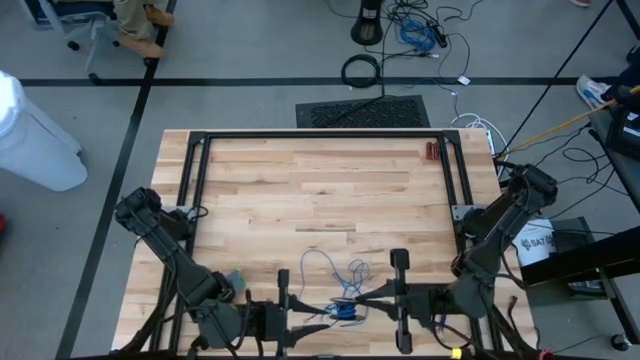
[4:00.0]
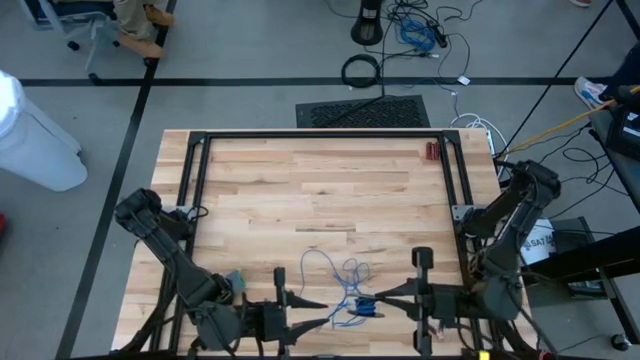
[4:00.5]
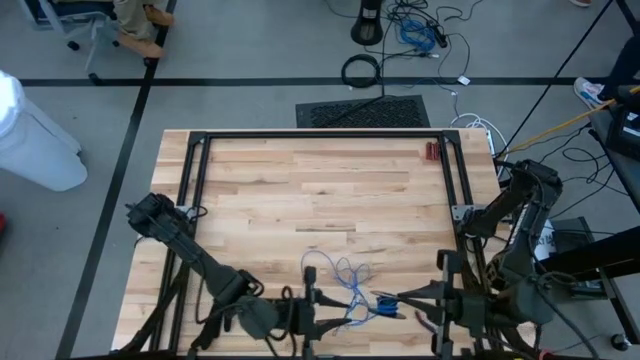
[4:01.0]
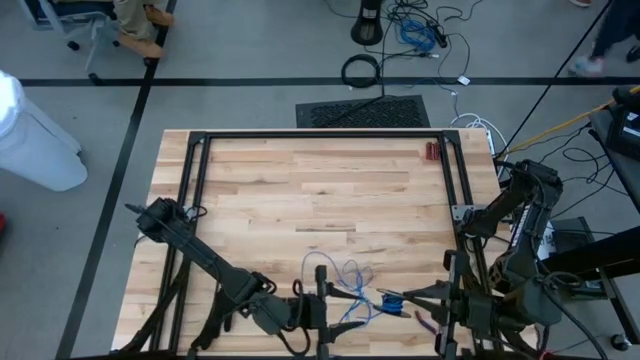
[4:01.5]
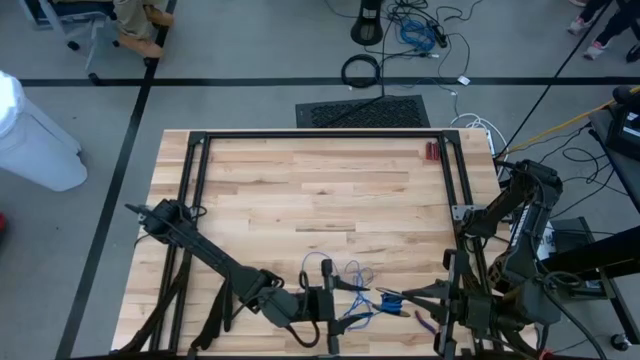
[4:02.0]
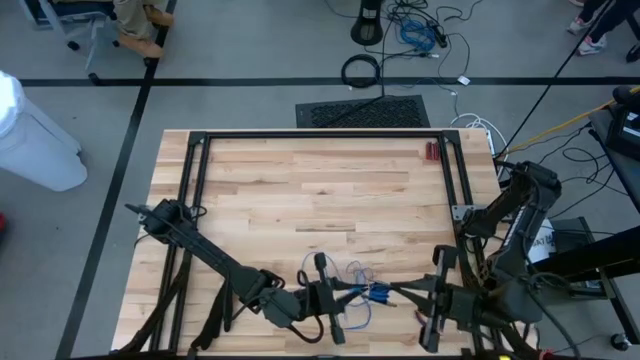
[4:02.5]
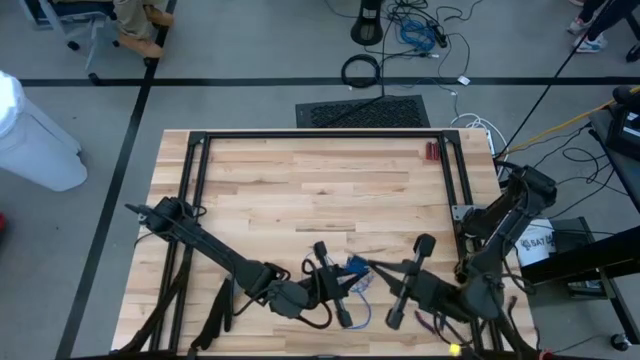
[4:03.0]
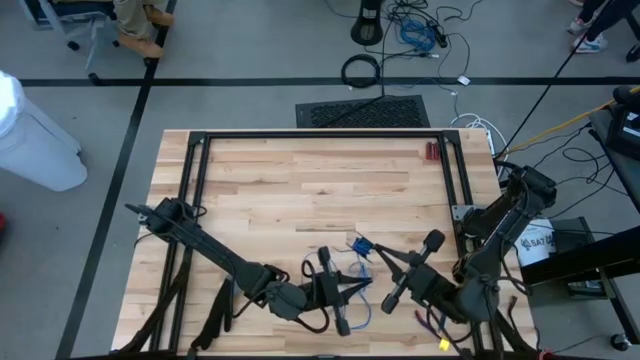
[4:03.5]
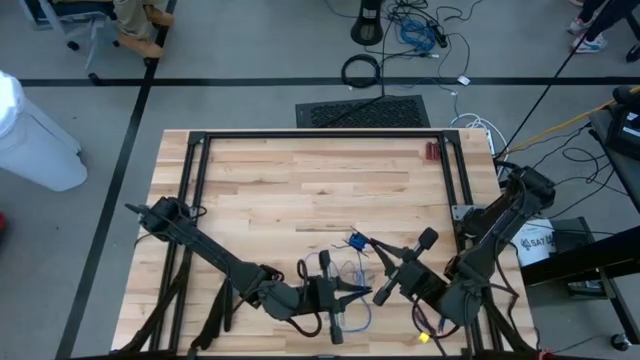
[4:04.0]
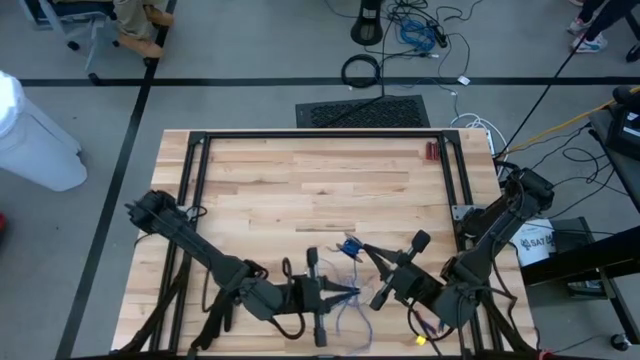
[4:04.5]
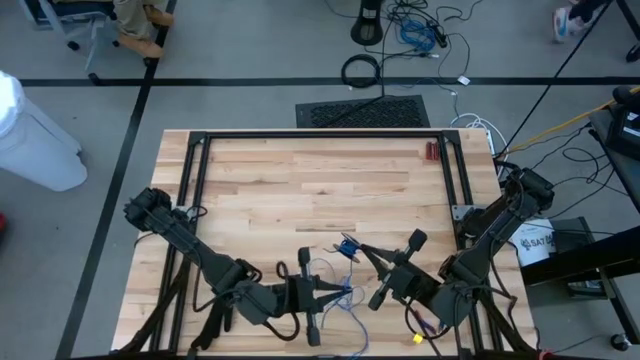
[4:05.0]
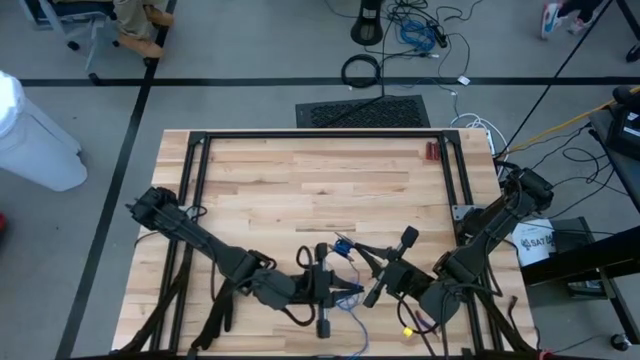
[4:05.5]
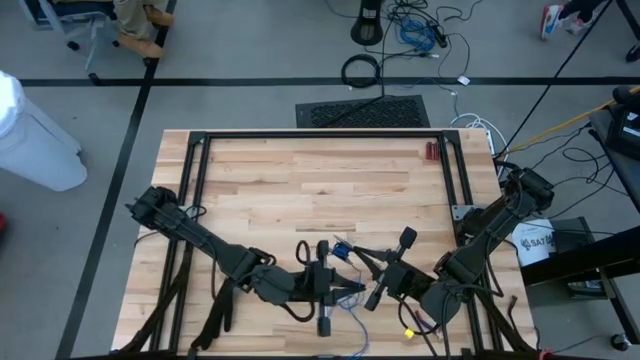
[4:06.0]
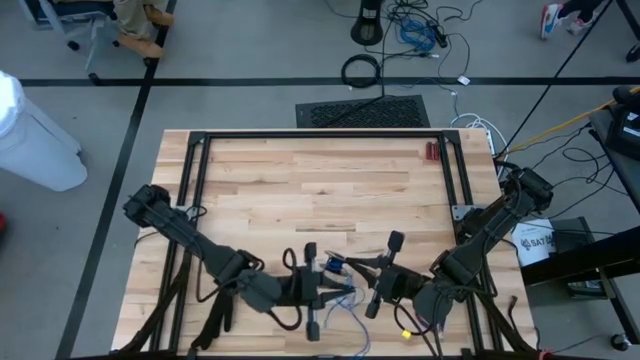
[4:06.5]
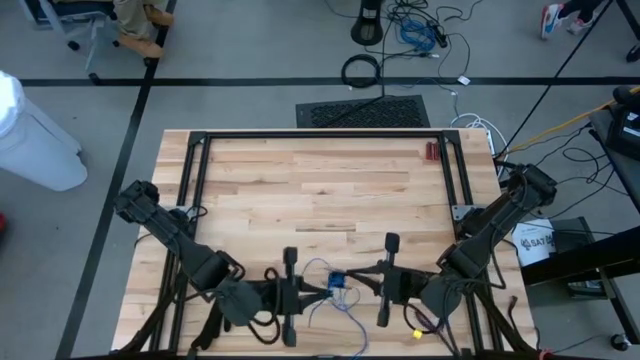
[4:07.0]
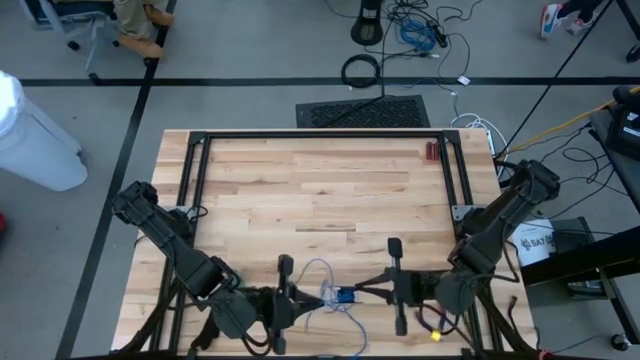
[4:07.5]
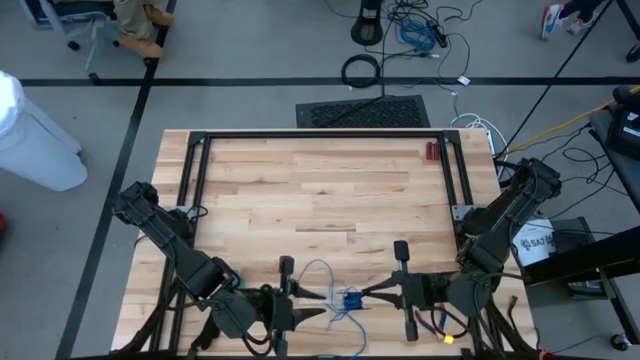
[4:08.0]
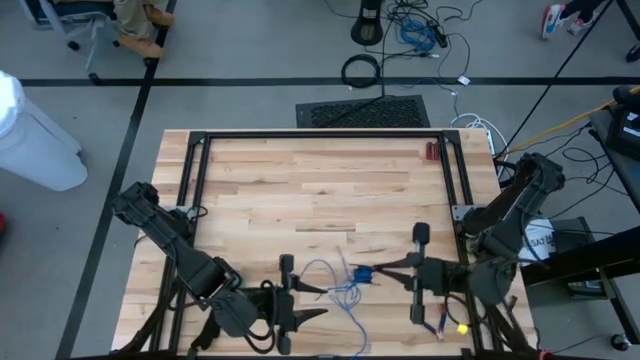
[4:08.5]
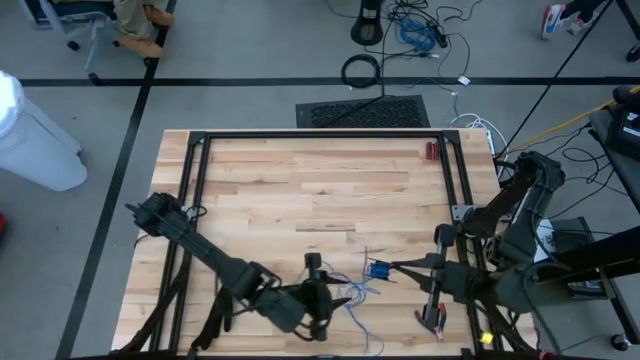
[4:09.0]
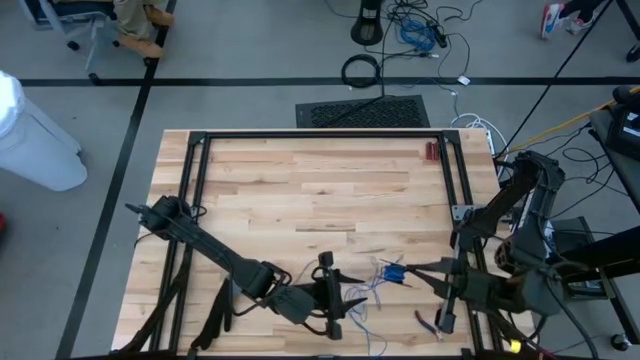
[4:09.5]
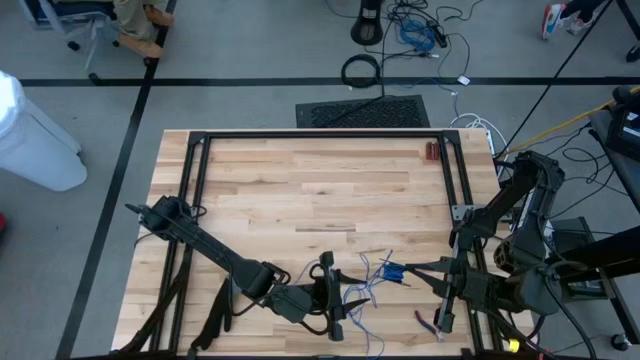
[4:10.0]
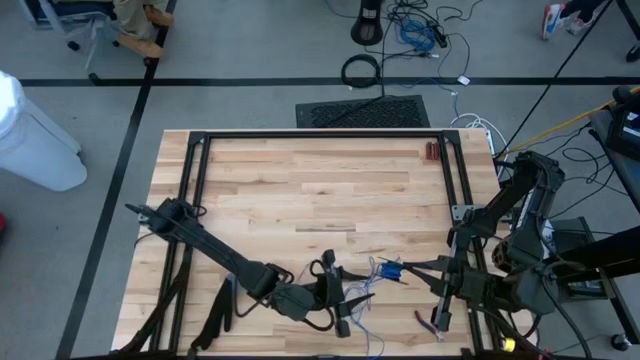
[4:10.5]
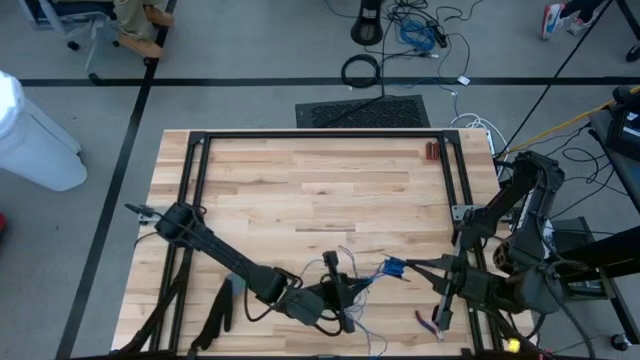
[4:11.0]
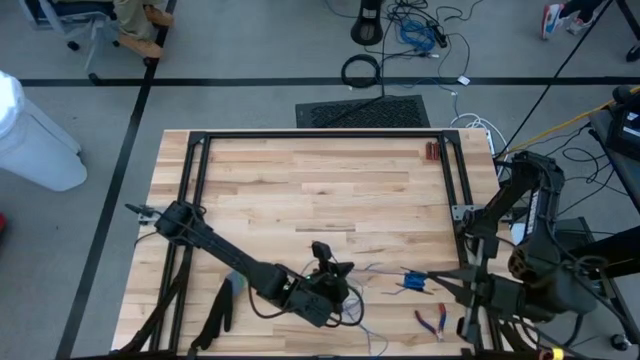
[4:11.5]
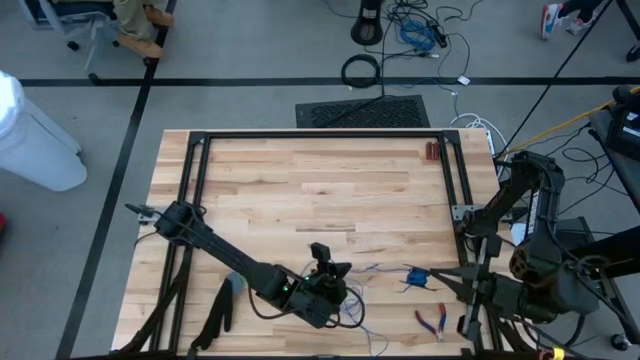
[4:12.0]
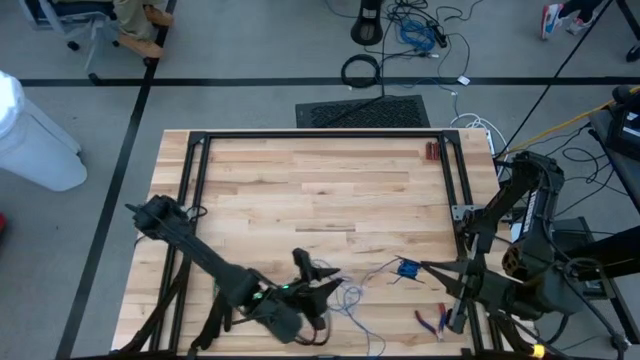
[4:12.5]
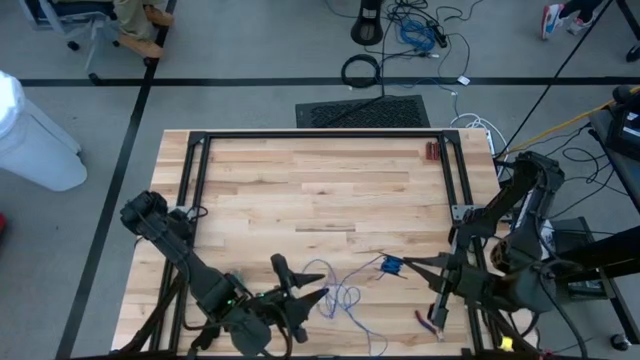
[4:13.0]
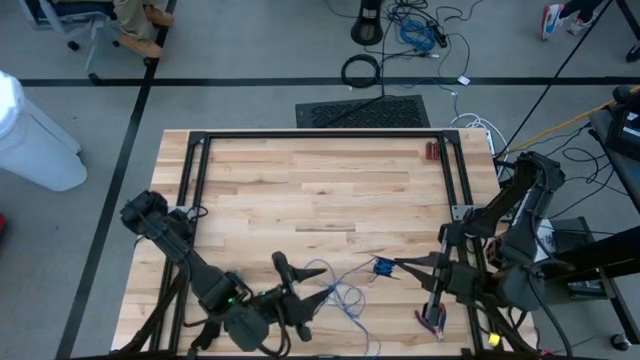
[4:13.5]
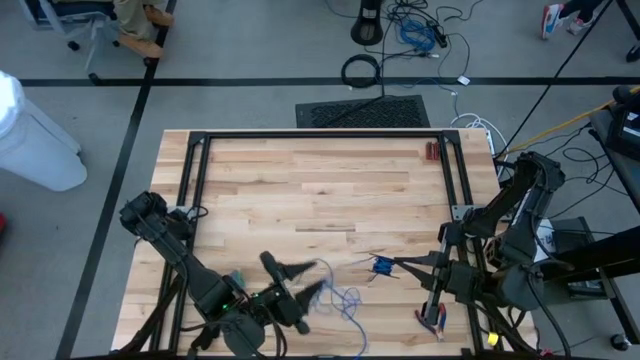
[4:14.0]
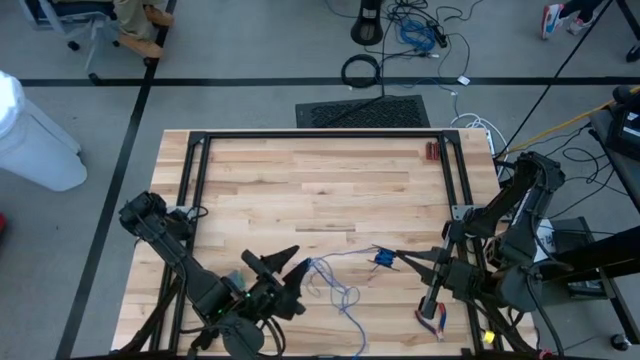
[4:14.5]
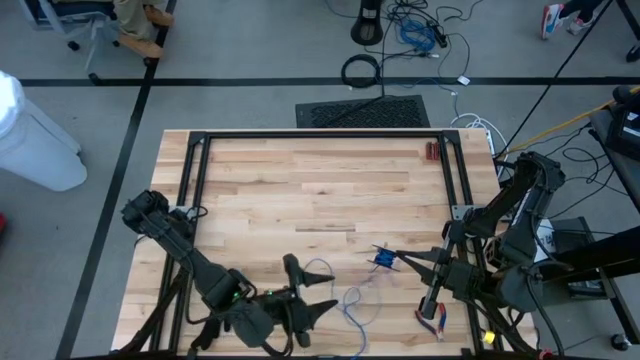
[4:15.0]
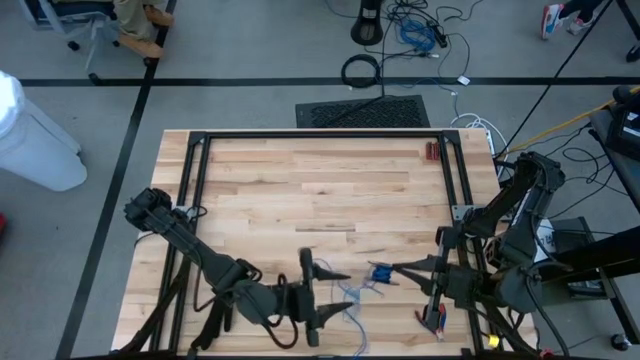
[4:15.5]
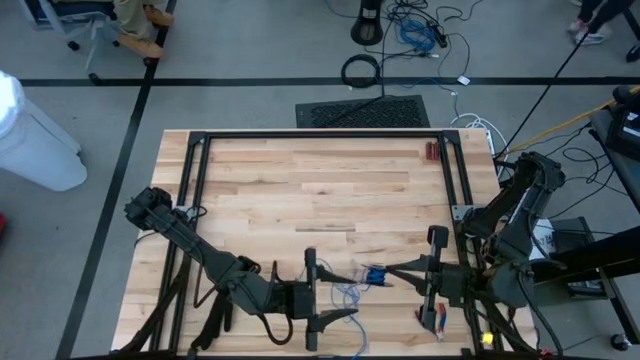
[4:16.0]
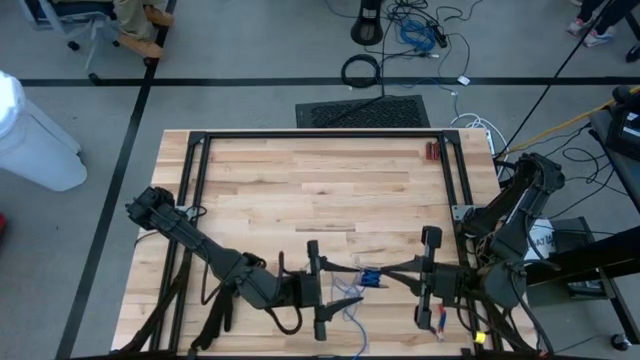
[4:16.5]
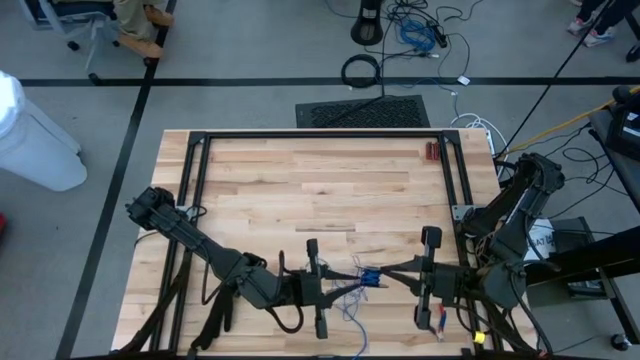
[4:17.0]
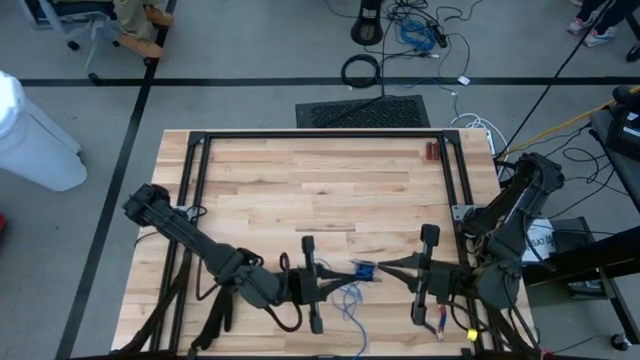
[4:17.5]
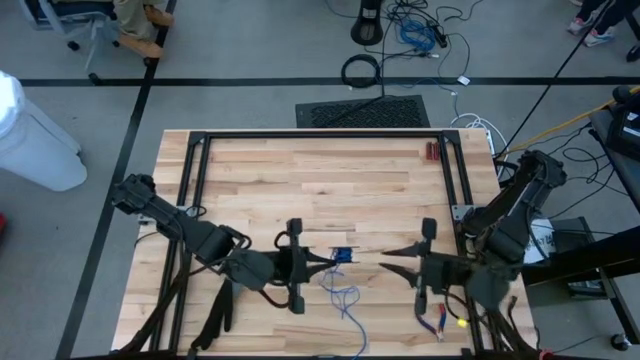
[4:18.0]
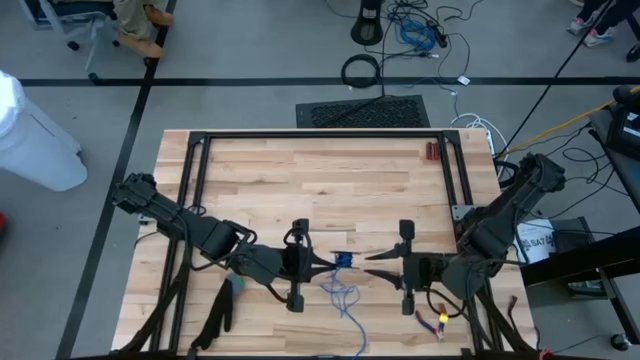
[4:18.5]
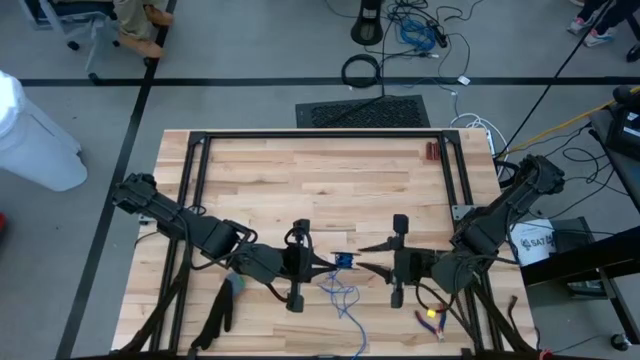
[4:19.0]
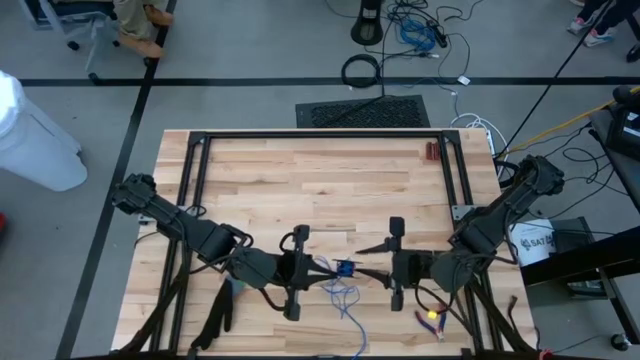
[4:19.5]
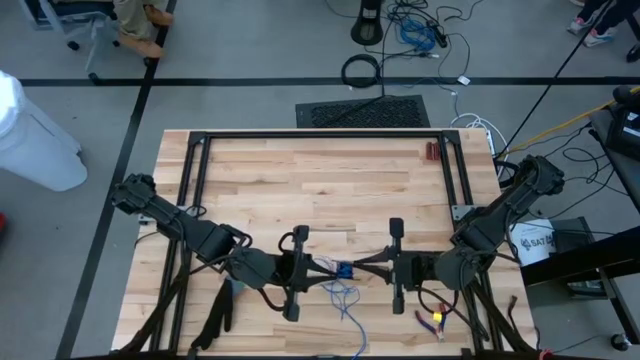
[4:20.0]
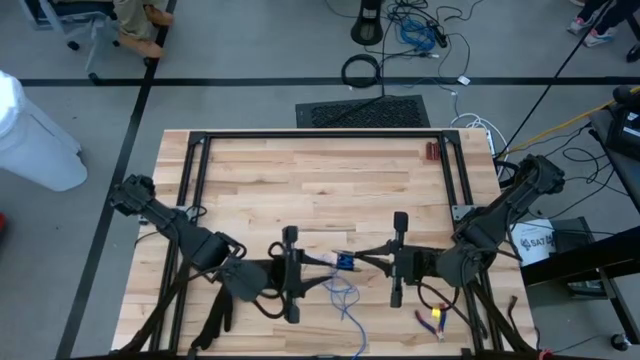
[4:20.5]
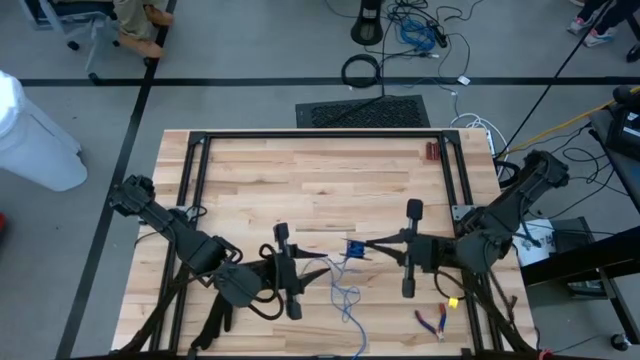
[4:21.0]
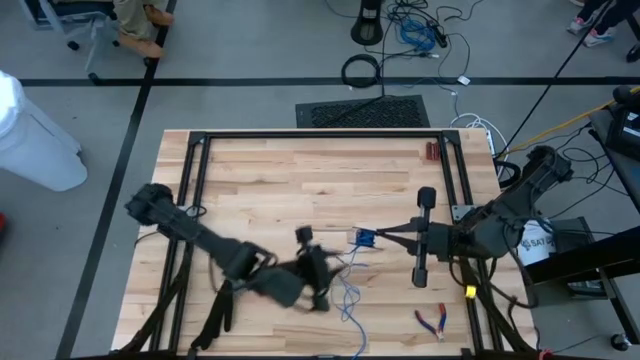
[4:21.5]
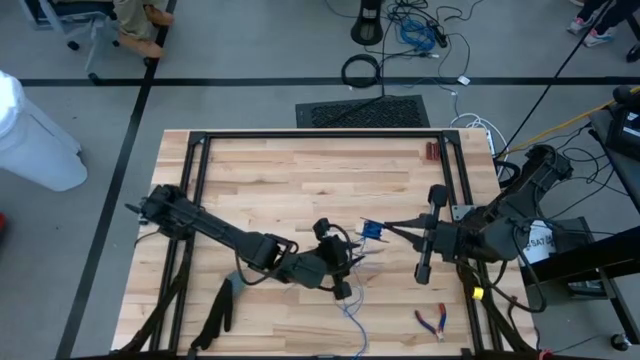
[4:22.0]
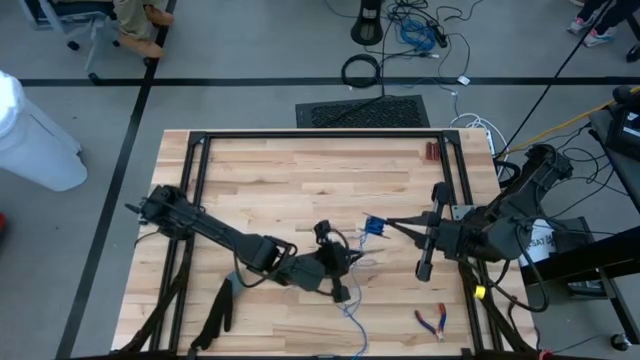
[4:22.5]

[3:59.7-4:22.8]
Task: Coil cords
Coil the blue wire onto the black spool
